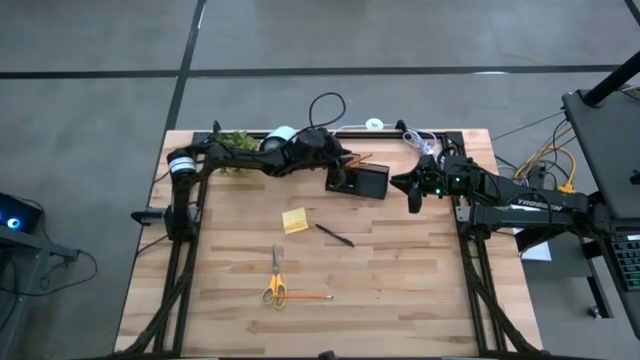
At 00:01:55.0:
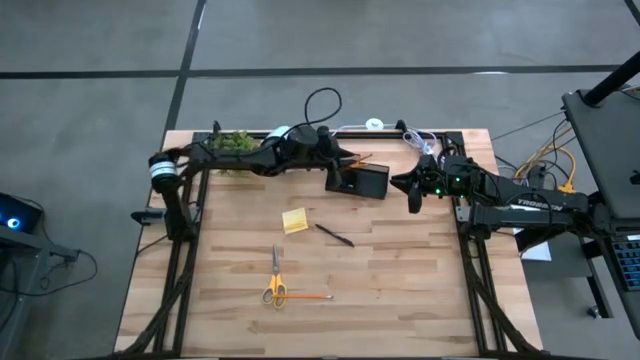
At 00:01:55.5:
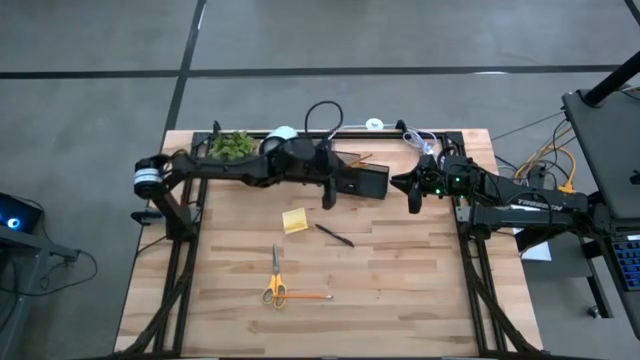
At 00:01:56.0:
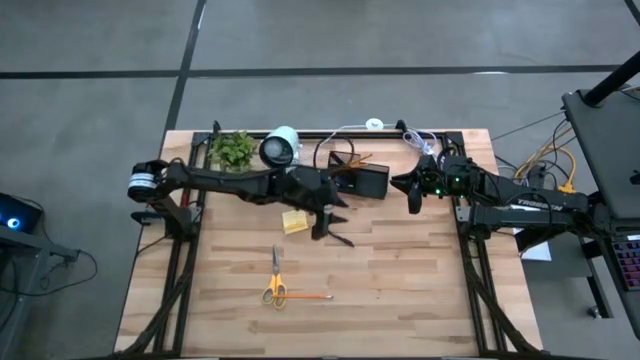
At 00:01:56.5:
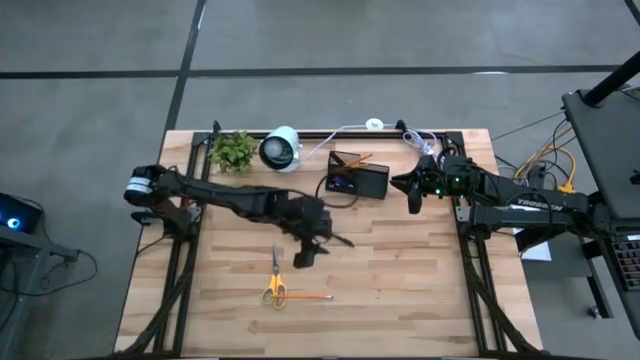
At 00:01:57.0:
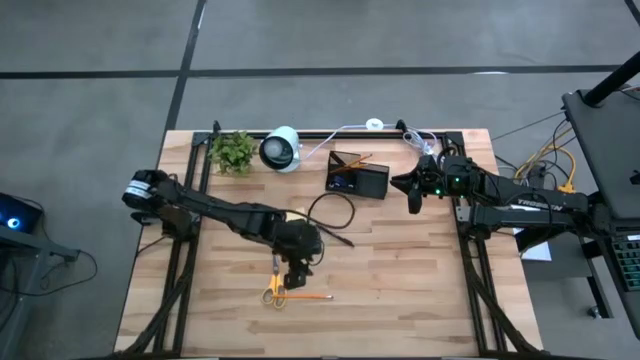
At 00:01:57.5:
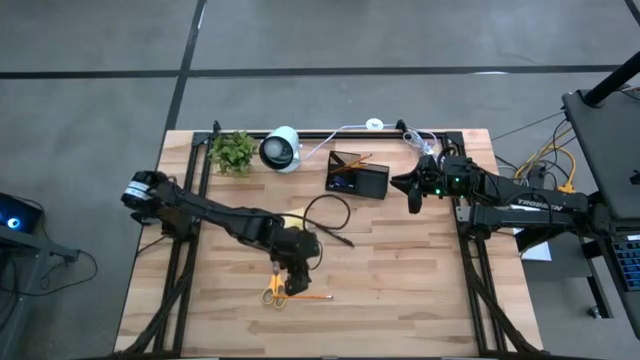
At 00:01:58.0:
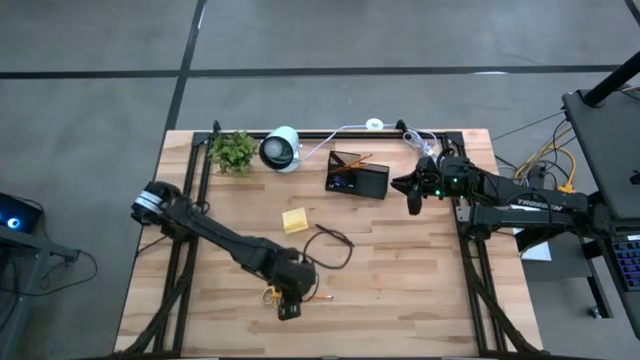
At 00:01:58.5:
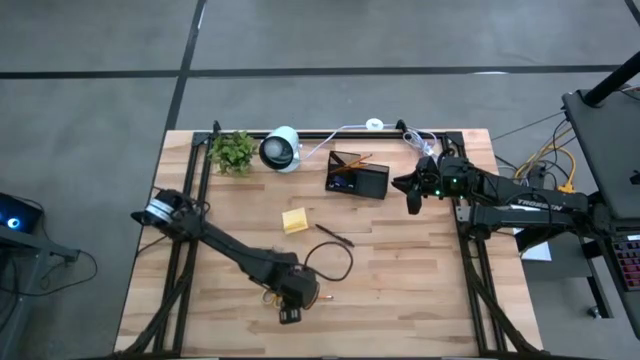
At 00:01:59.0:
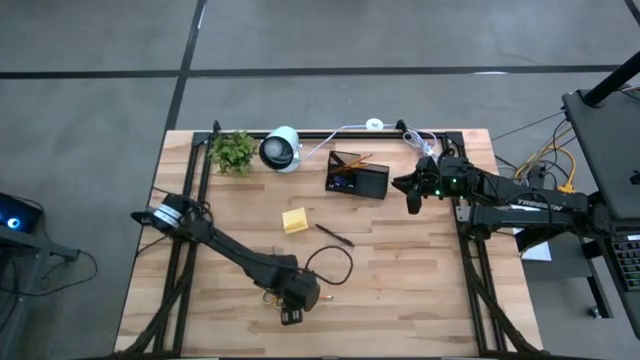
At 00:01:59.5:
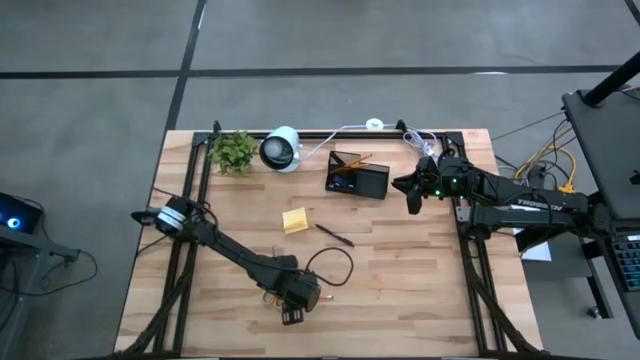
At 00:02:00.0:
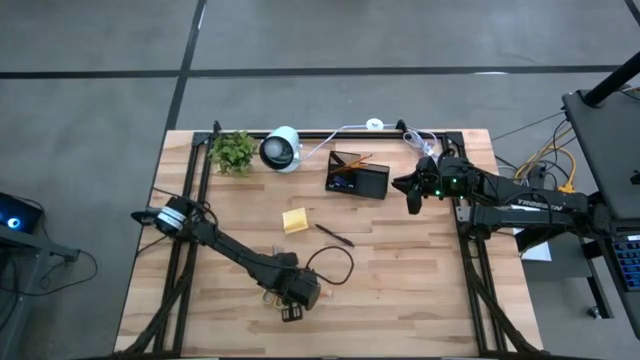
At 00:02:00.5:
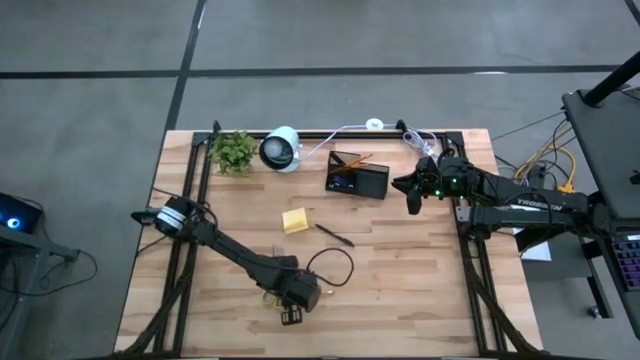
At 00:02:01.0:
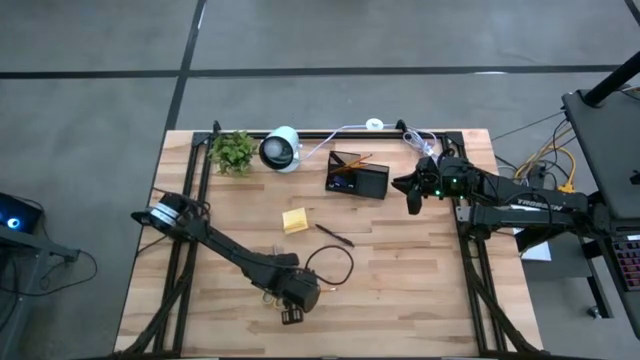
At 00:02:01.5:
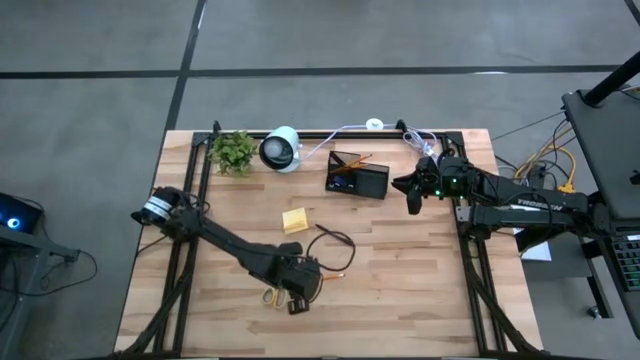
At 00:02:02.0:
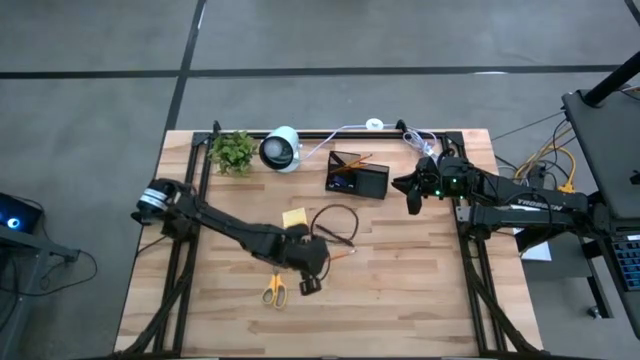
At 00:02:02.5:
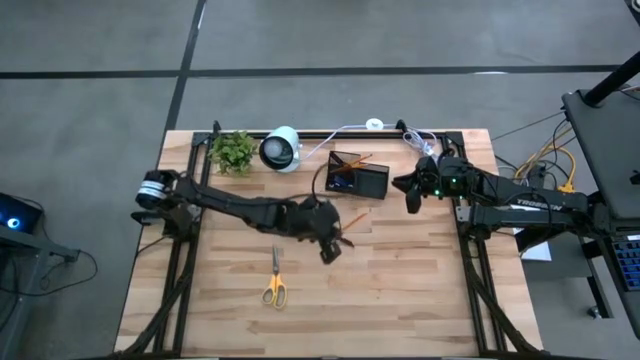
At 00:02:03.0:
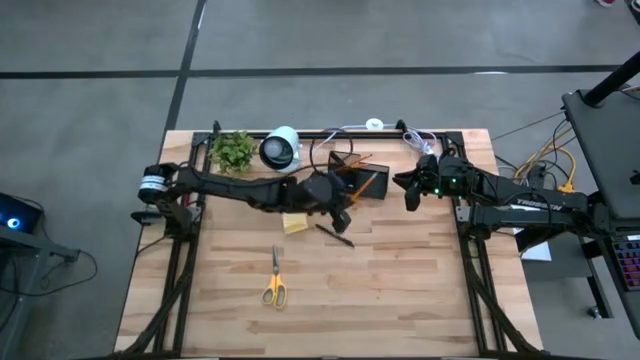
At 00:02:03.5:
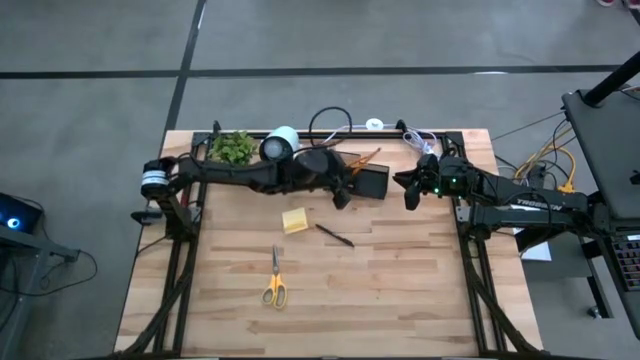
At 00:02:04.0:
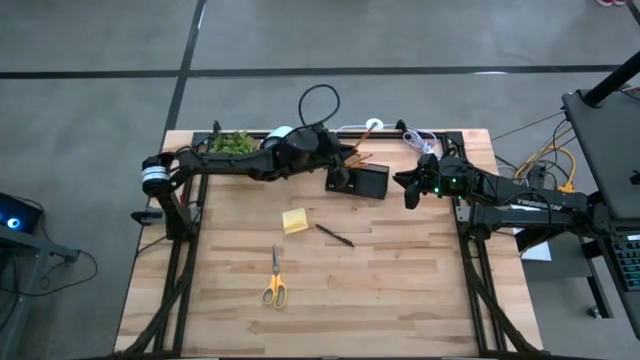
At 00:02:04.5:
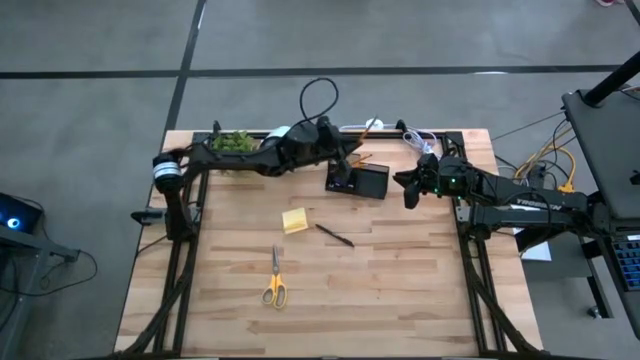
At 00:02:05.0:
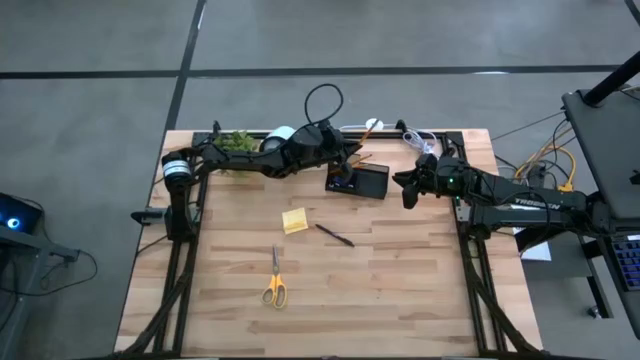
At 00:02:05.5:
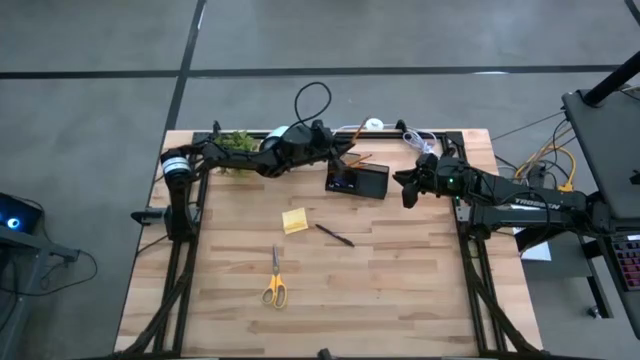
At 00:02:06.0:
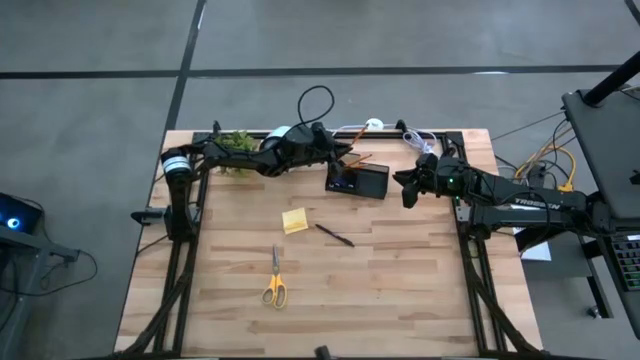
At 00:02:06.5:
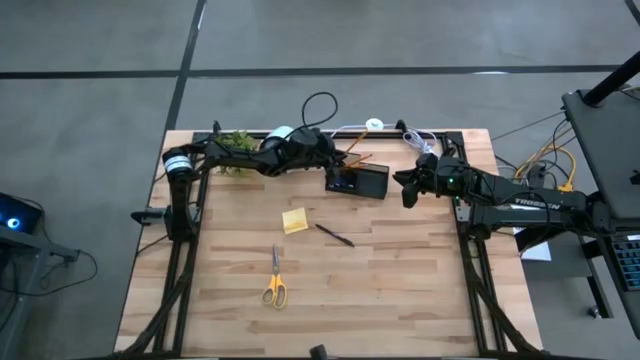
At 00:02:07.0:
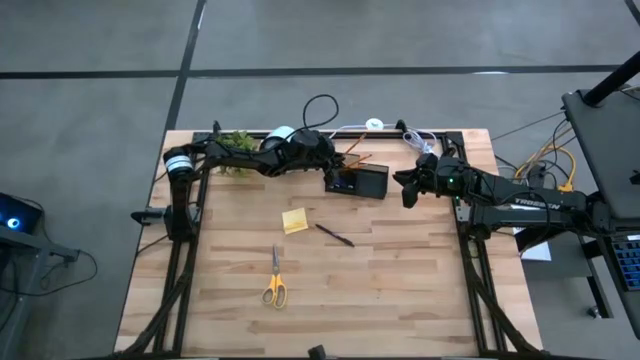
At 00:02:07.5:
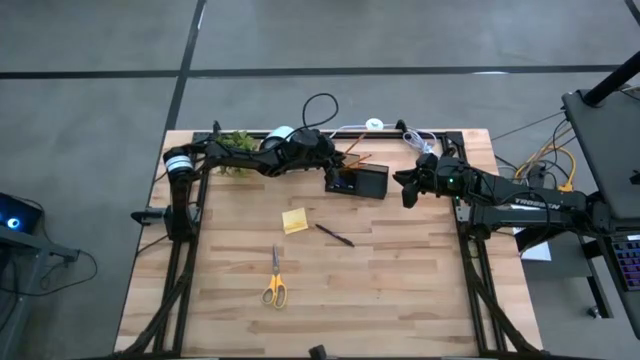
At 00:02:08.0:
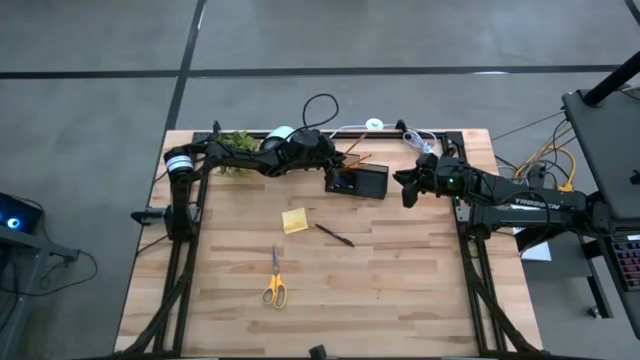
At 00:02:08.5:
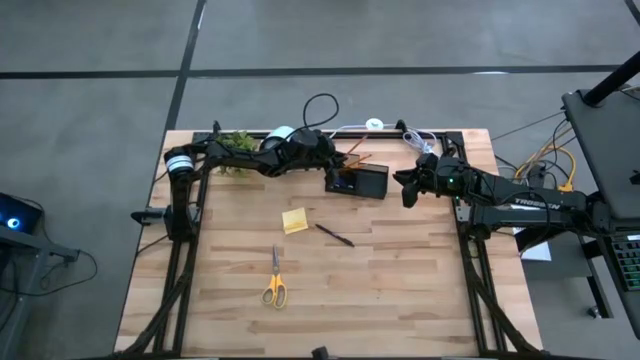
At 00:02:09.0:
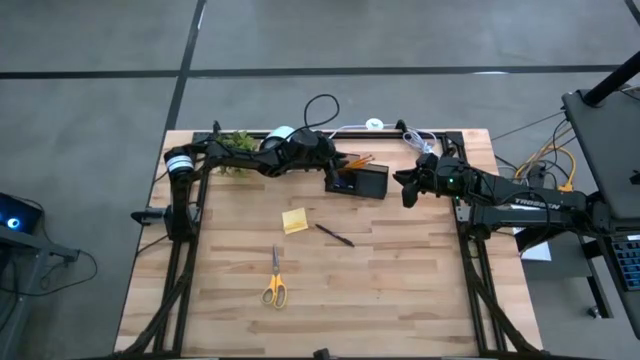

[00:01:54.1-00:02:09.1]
Task: Pick and place office supplies into organizer
Put the pencil into the desk organizer

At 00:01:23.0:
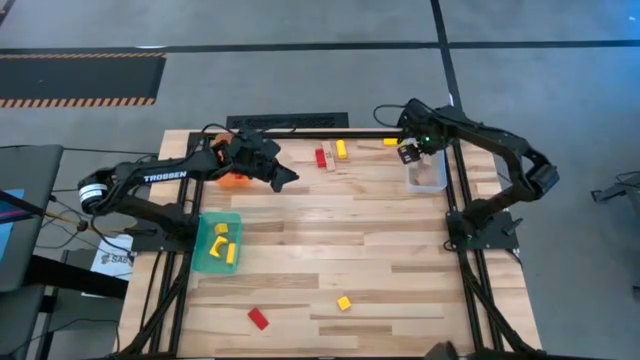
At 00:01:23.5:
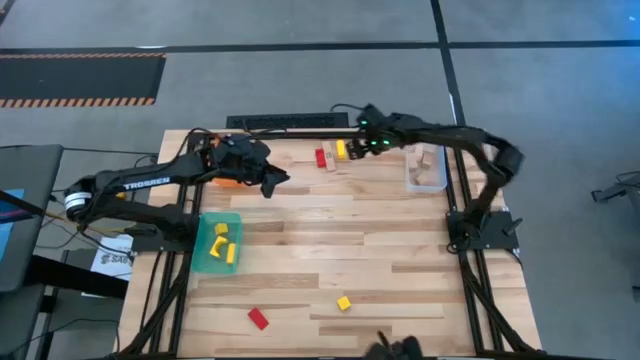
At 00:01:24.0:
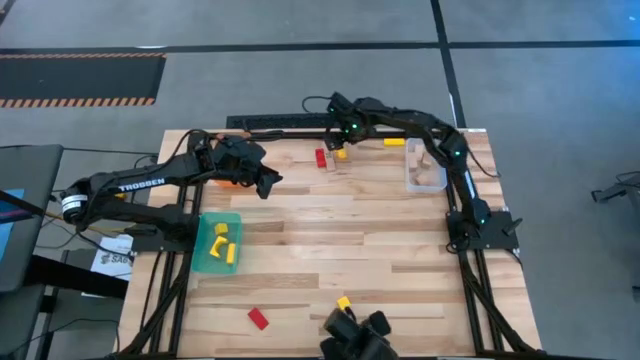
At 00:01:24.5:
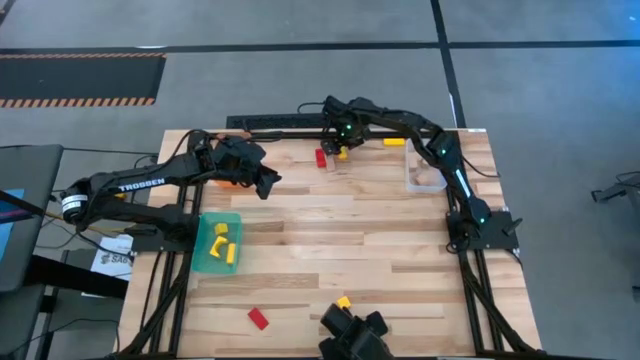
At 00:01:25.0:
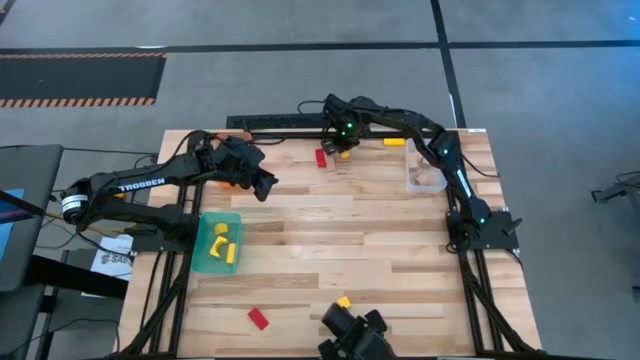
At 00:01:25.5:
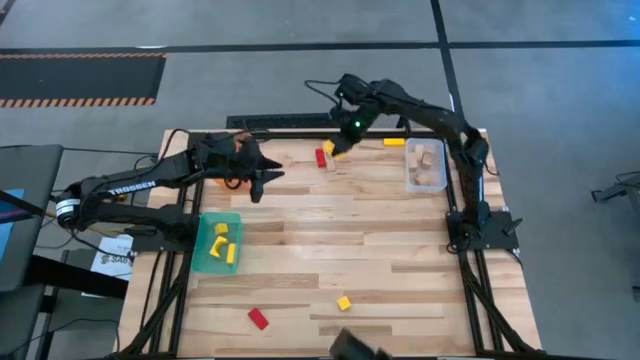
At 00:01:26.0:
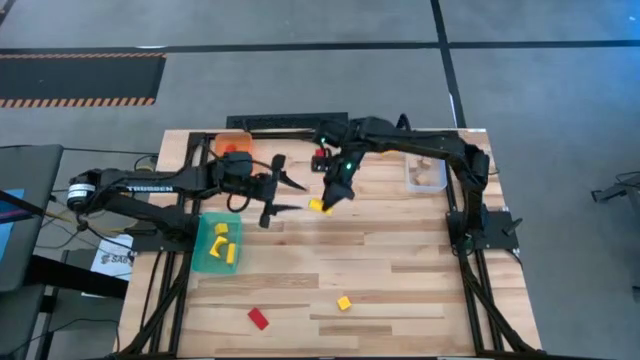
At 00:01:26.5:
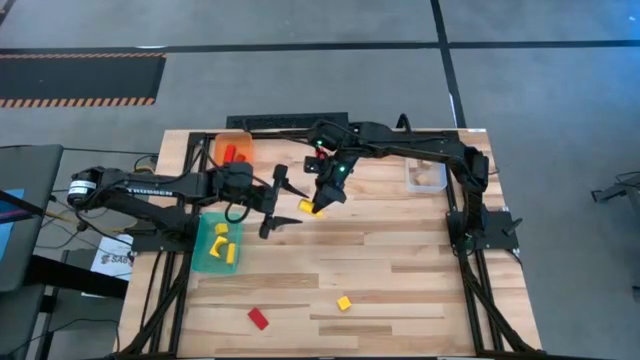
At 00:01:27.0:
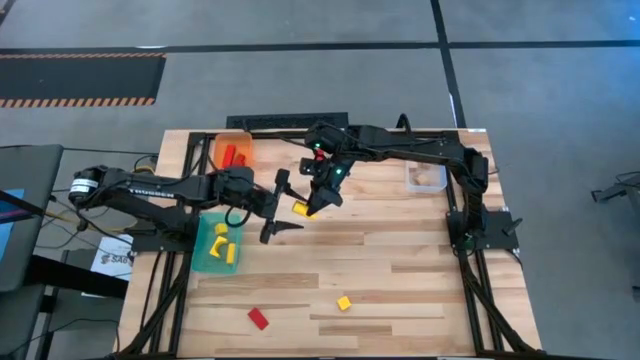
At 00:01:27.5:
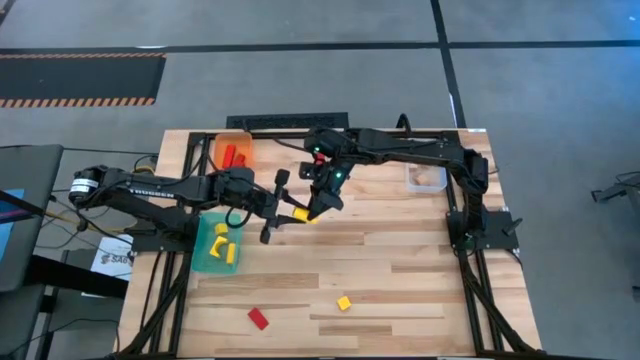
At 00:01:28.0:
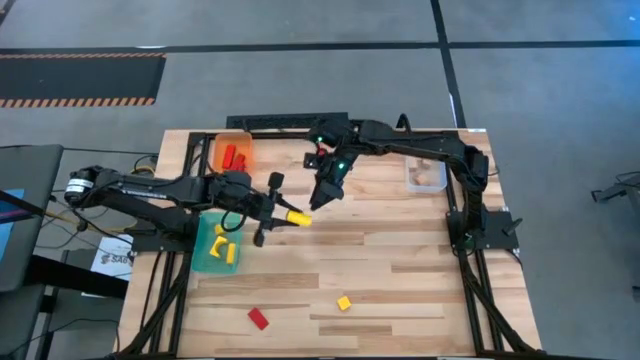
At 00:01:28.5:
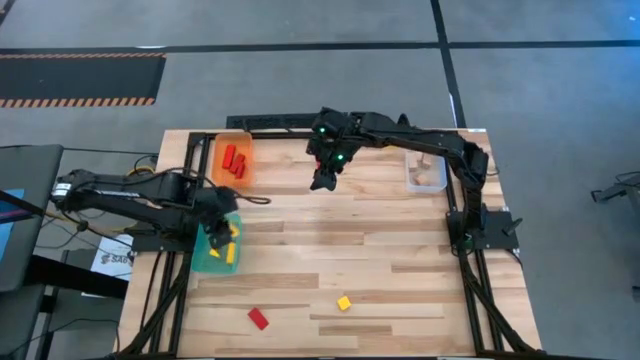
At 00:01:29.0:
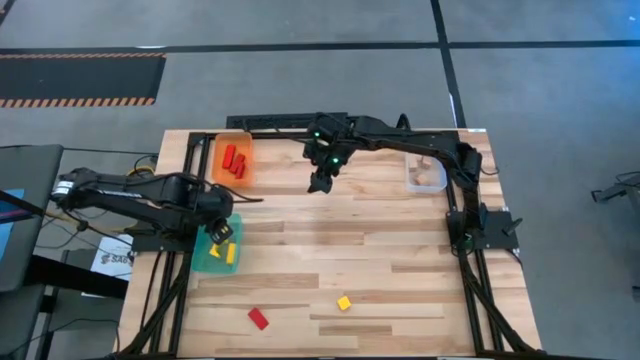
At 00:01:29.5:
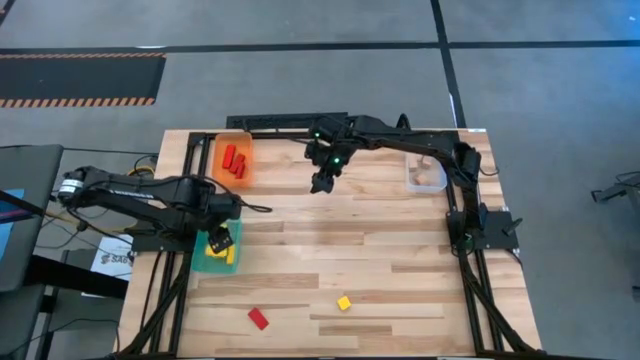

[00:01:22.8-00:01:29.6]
Task: Sort & place blocks by color
Put the yellow wooden block into the green bin
